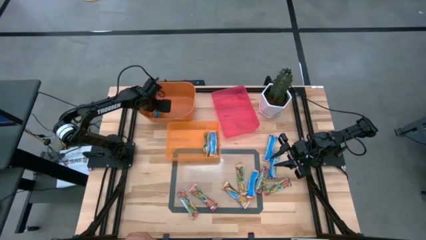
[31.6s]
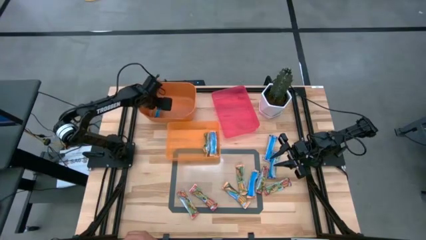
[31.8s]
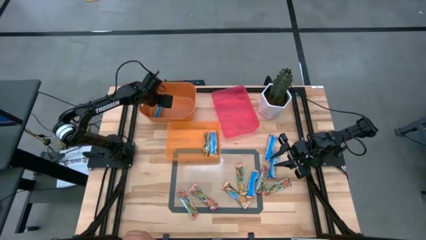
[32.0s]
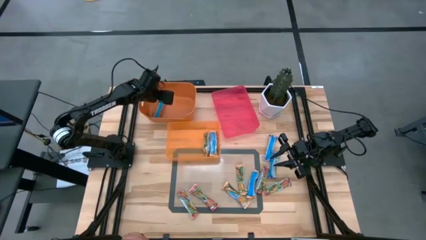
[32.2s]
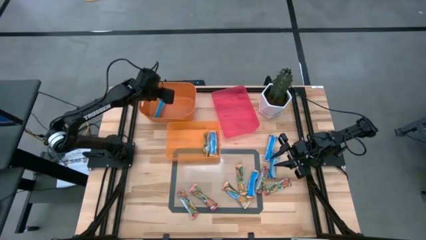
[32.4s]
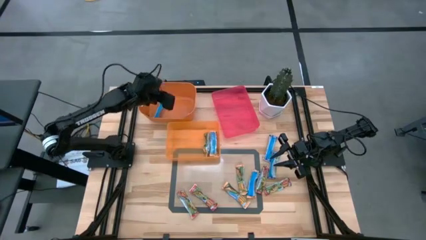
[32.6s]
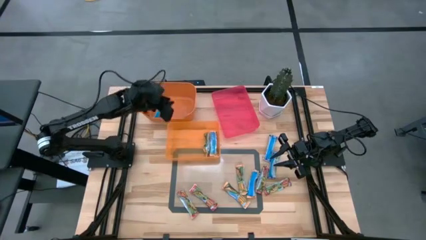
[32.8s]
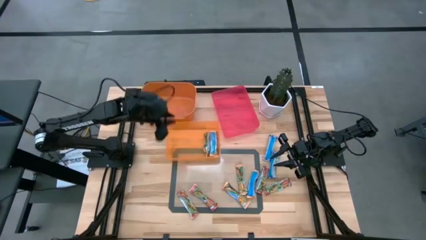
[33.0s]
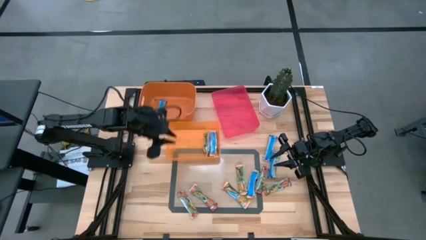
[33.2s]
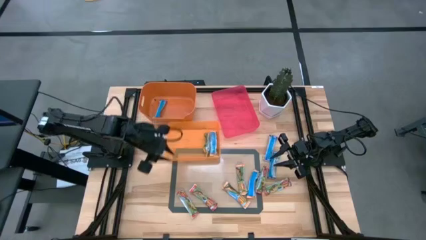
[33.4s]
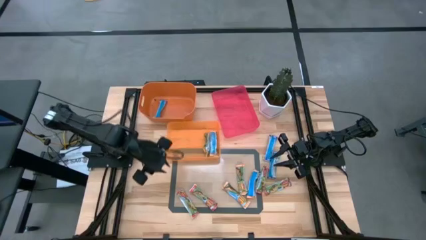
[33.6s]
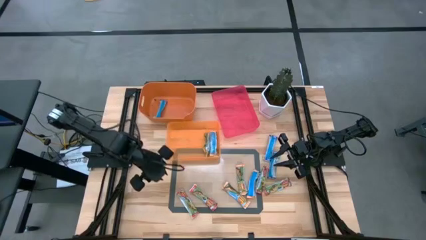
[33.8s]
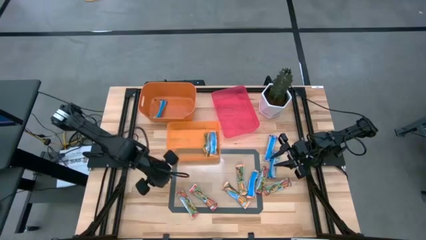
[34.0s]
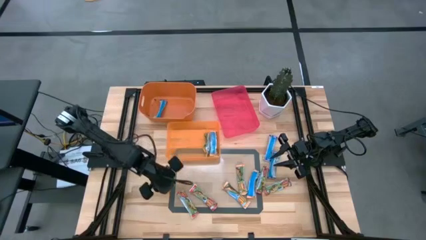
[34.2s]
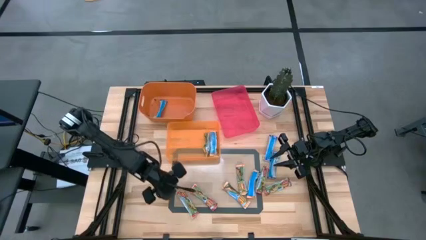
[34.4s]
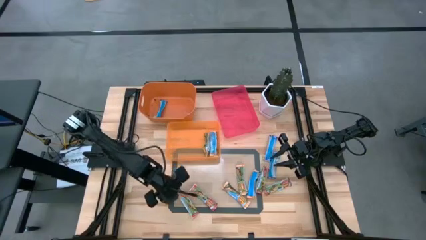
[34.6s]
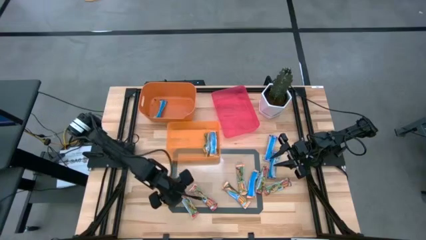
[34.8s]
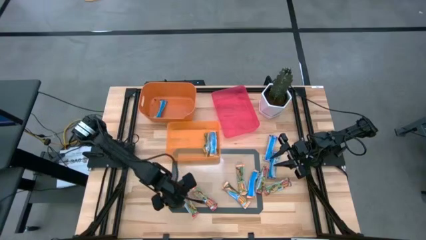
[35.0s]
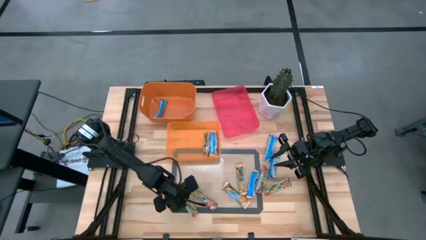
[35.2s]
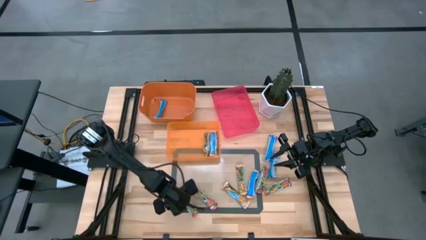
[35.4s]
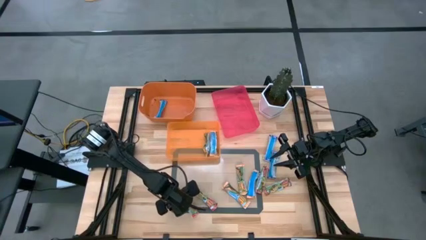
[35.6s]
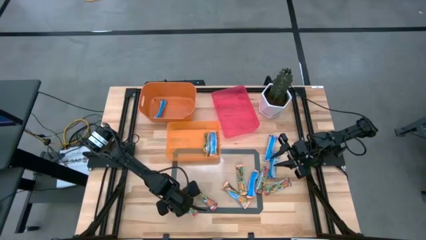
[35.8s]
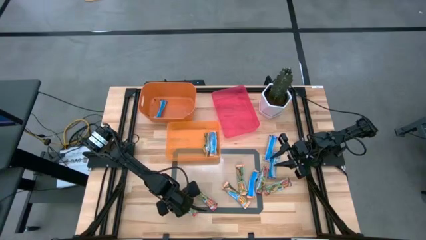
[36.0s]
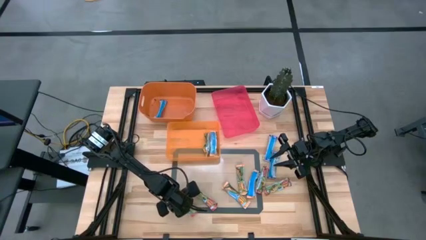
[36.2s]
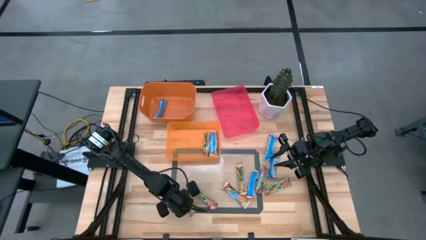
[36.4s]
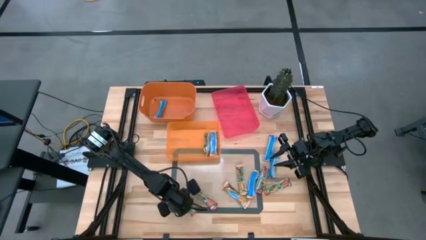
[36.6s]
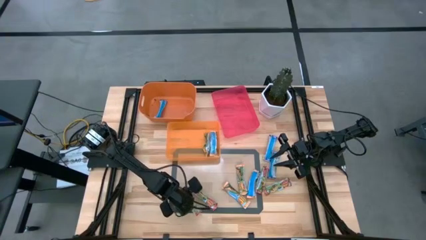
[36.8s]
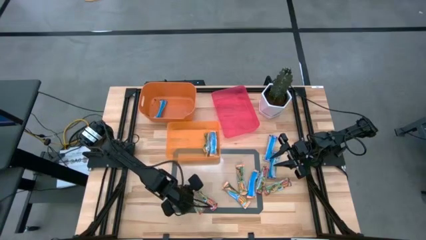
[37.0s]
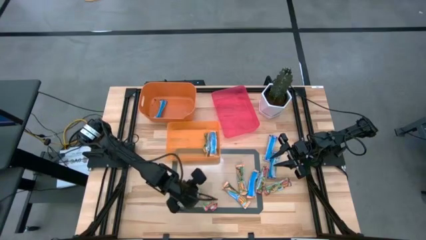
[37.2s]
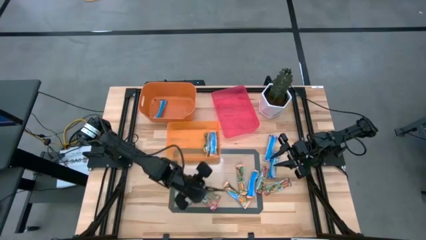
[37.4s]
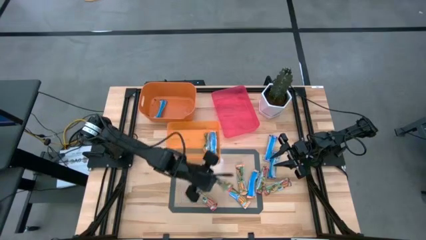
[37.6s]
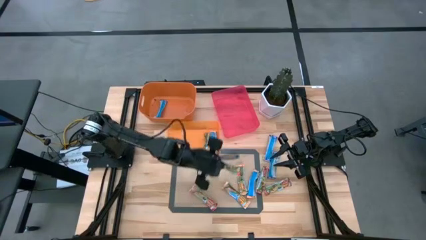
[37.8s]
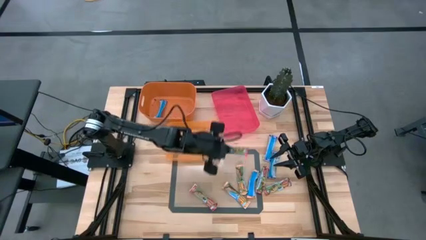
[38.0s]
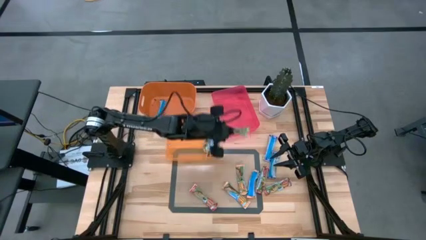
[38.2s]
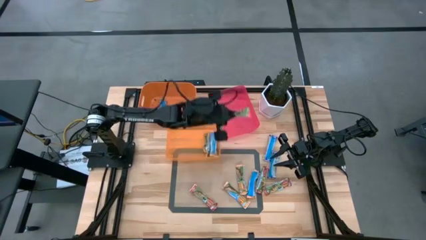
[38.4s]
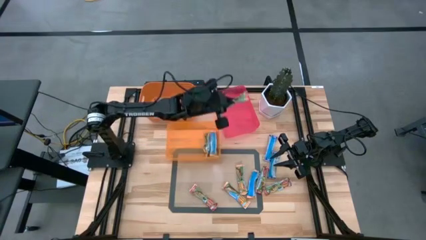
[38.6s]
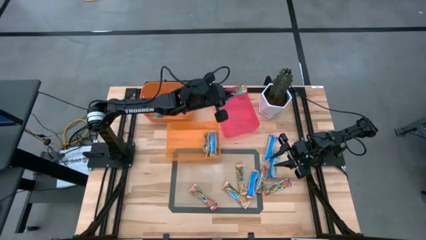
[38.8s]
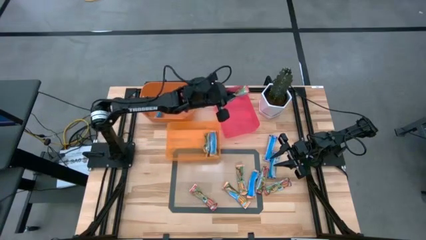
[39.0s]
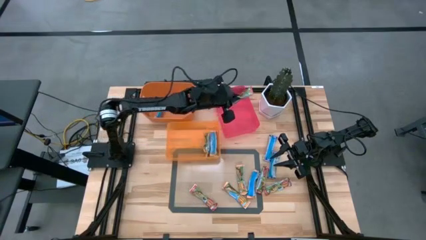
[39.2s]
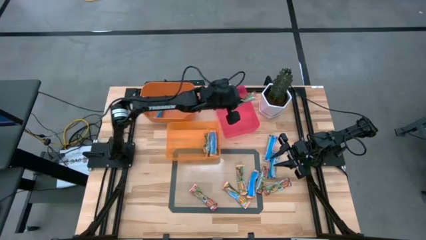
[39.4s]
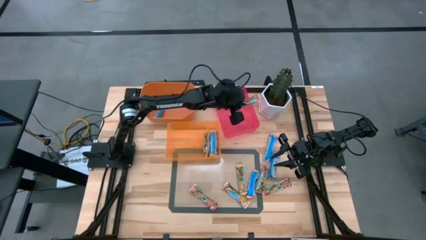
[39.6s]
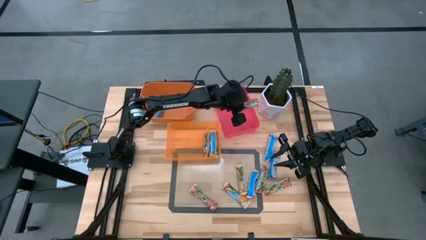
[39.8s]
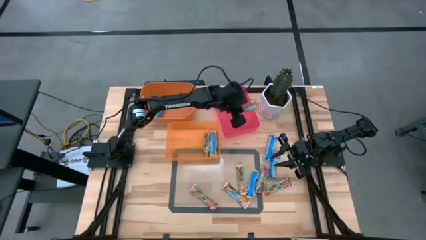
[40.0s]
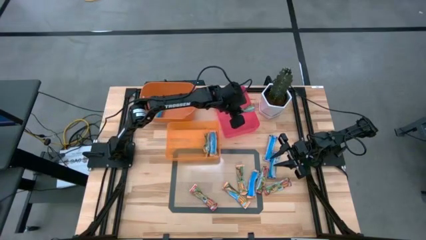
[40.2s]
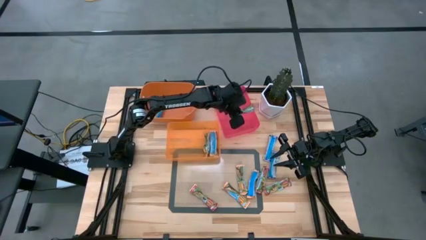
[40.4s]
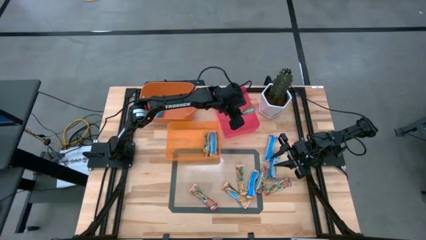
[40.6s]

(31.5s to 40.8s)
Task: Pick and place Granola Bars by type
Put the red granola bar into the red bin

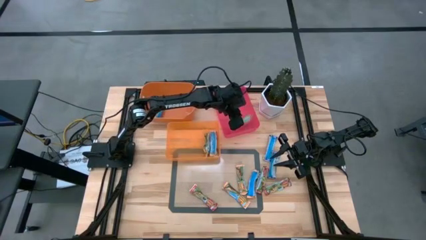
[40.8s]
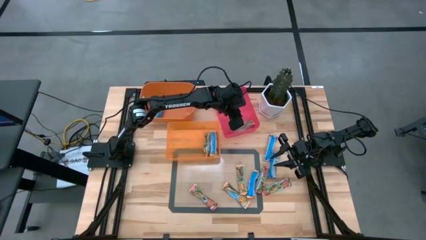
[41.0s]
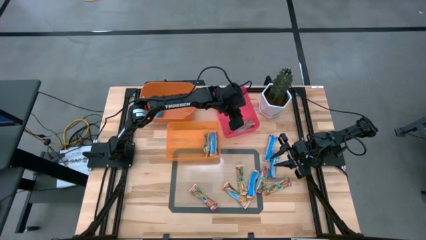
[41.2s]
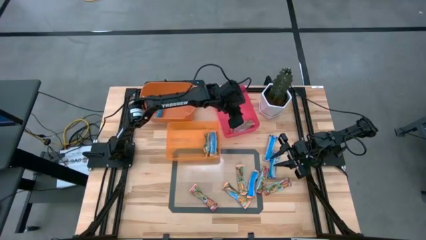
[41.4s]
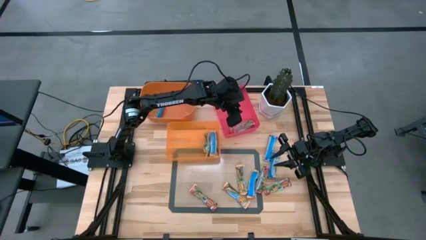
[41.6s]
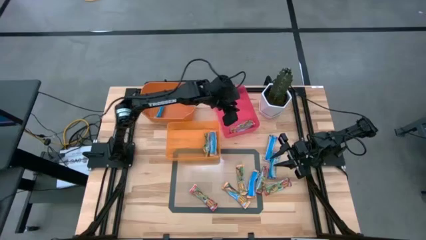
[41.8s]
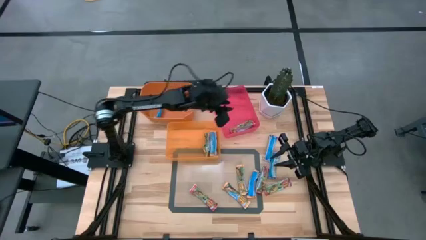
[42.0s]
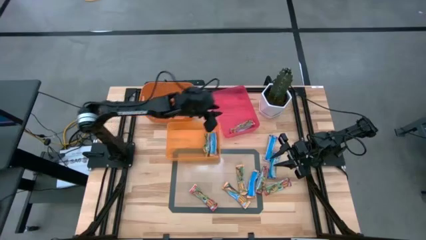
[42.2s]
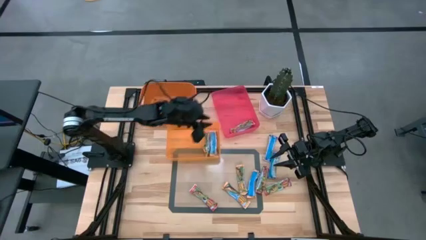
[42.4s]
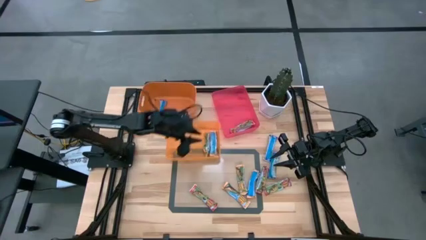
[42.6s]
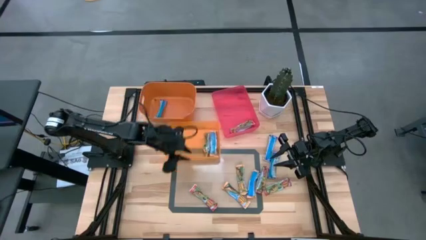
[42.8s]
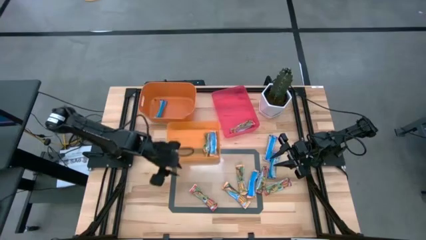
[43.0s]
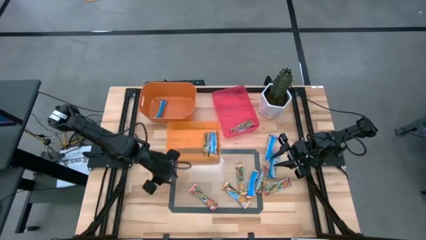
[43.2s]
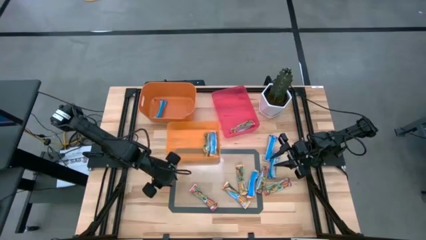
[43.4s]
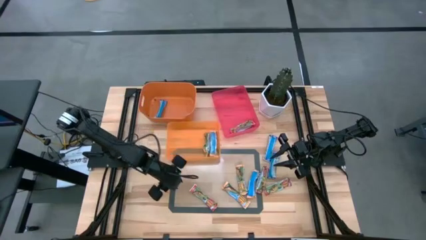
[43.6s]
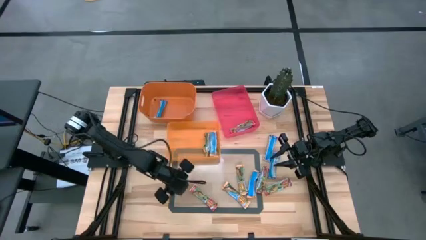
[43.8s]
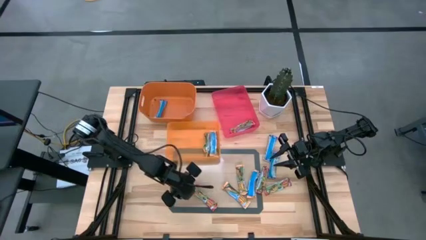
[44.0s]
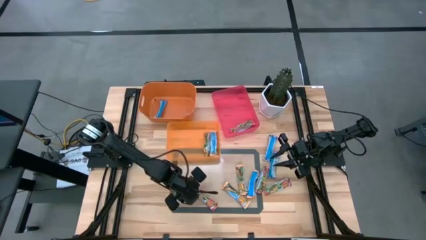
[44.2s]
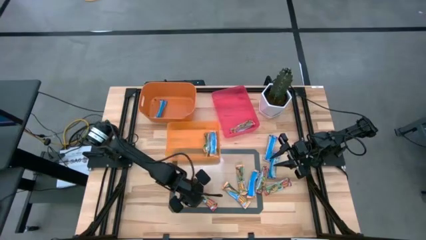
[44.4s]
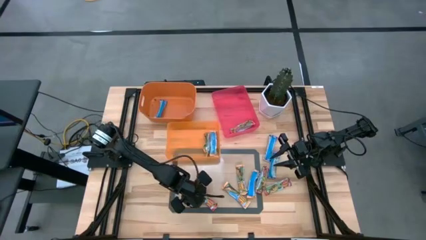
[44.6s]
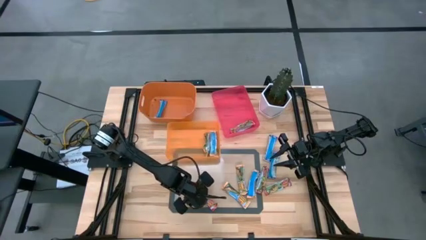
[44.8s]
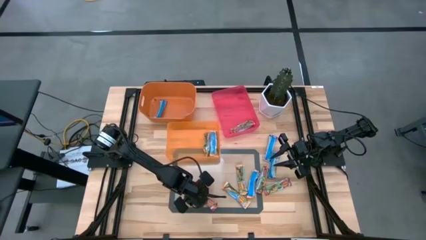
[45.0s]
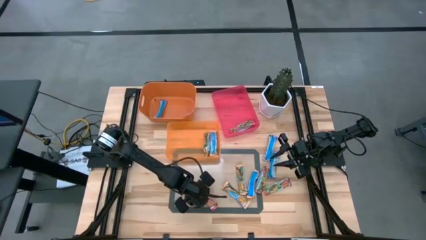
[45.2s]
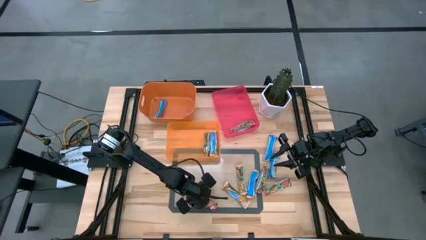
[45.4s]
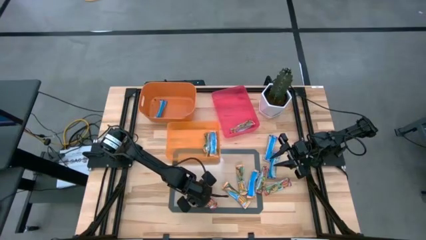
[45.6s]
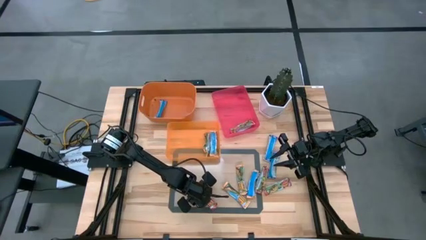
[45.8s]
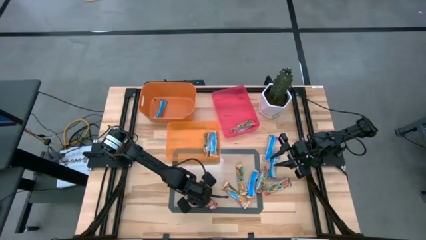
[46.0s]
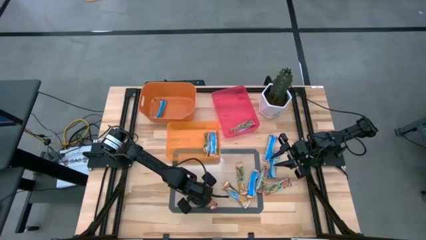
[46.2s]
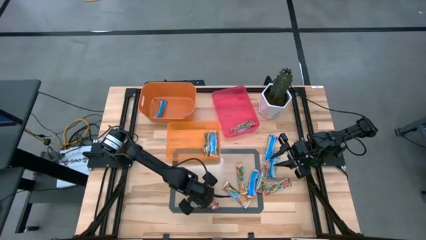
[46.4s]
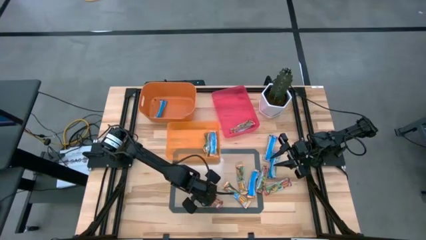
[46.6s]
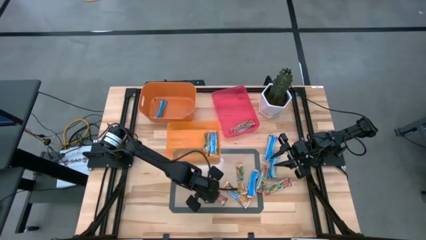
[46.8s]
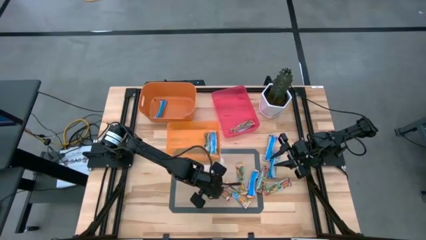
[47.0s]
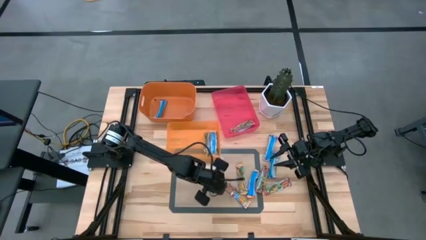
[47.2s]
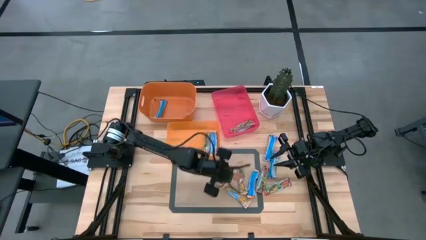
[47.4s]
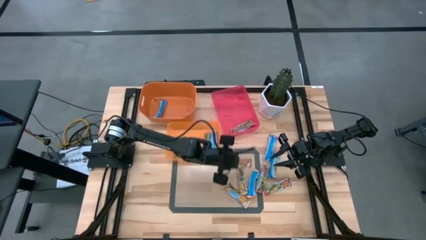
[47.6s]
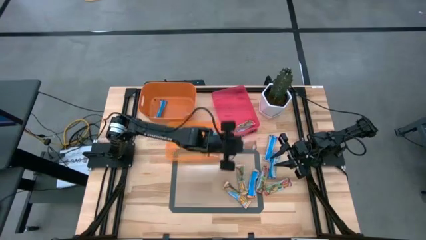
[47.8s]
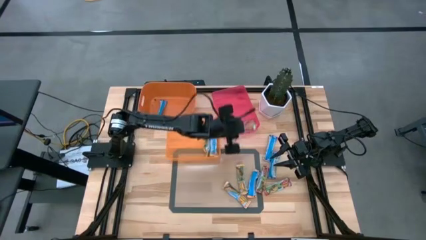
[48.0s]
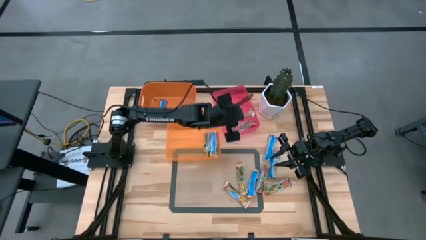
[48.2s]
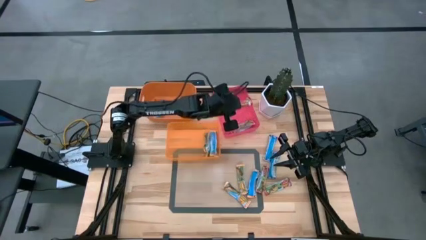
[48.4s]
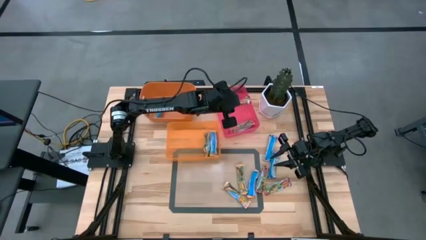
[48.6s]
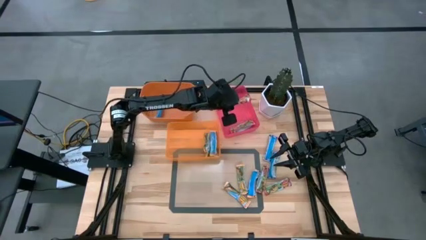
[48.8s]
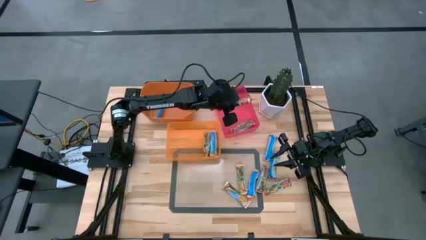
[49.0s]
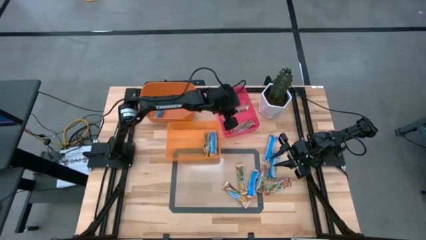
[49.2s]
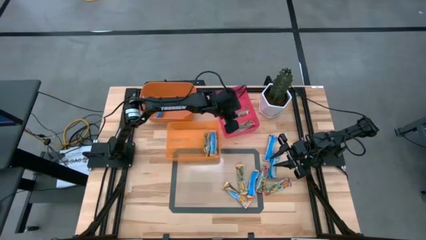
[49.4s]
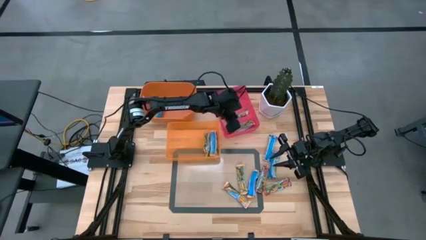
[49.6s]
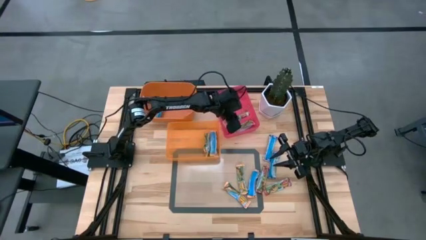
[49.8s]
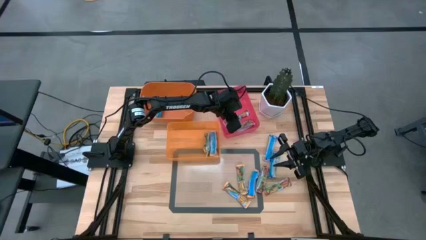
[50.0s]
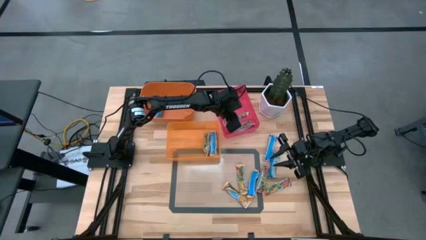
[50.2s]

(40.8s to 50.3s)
Put the red granola bar into the red bin
